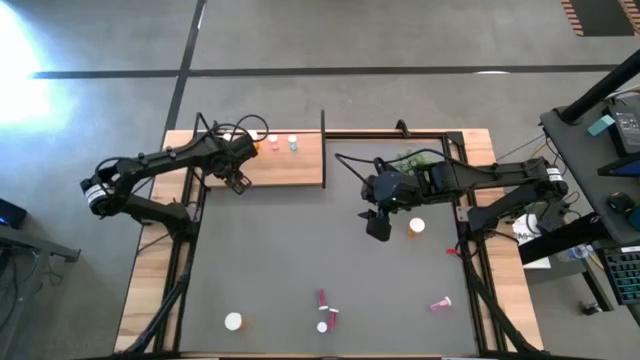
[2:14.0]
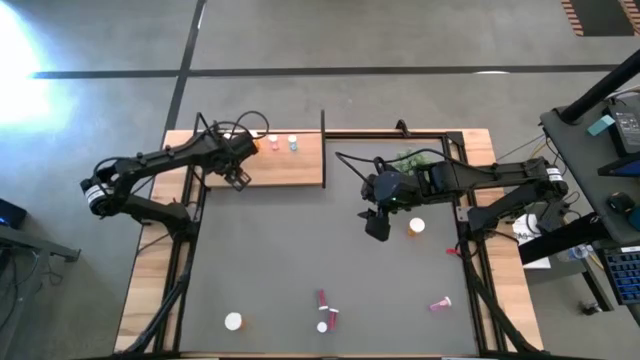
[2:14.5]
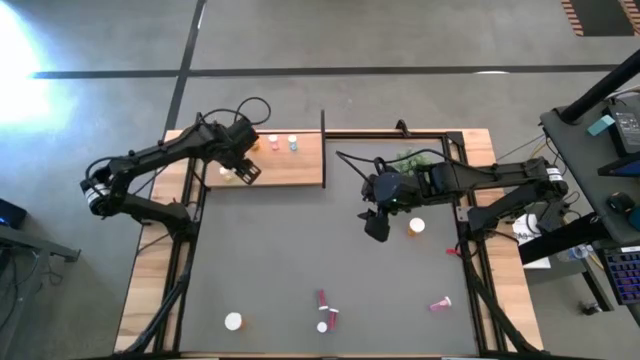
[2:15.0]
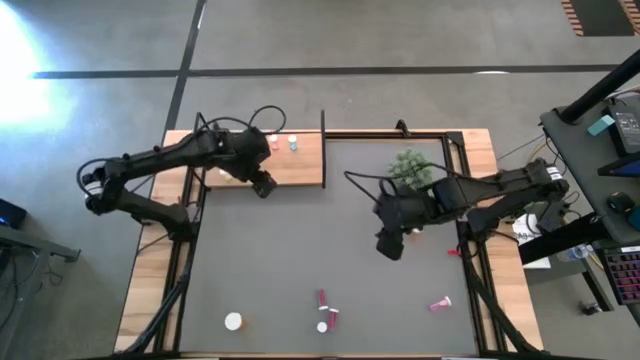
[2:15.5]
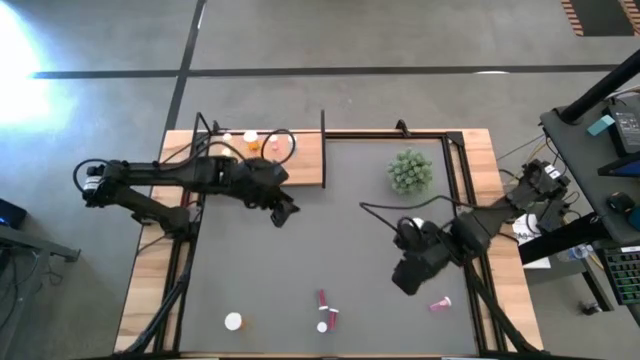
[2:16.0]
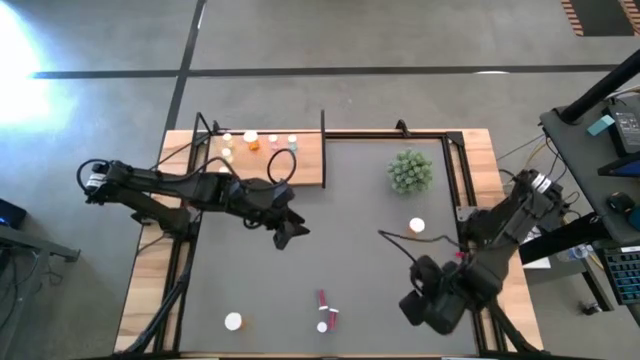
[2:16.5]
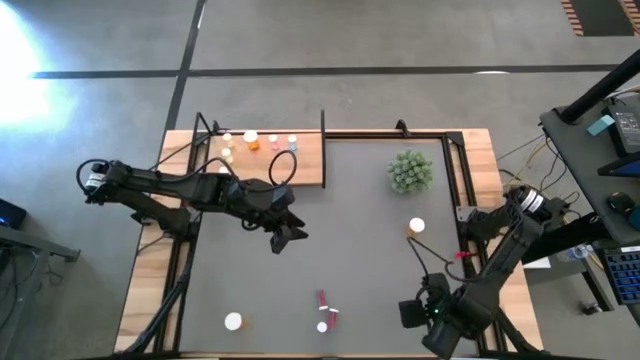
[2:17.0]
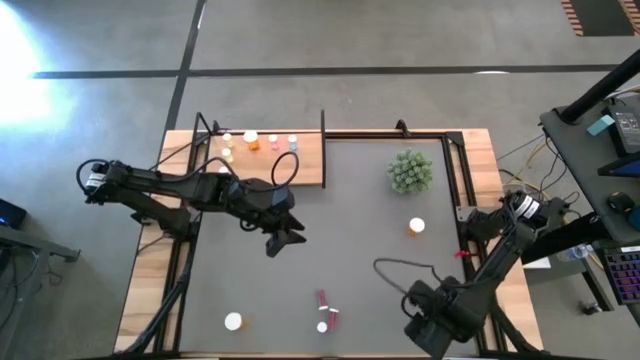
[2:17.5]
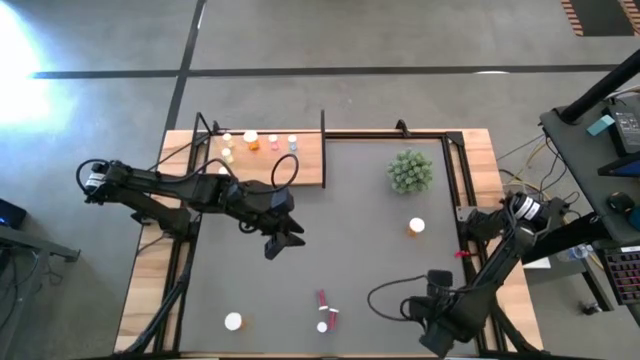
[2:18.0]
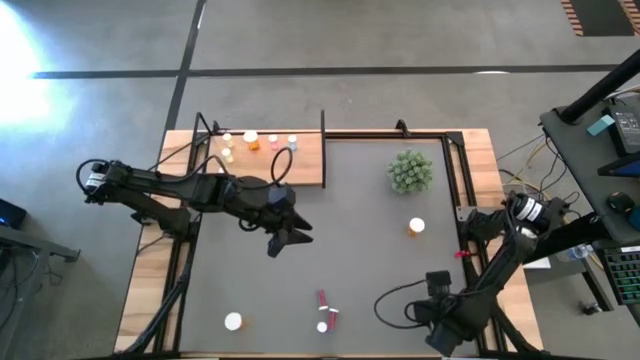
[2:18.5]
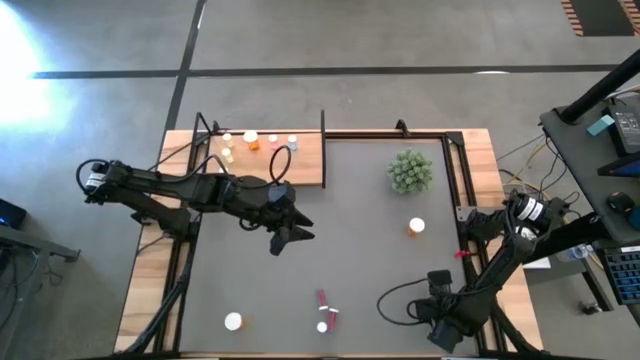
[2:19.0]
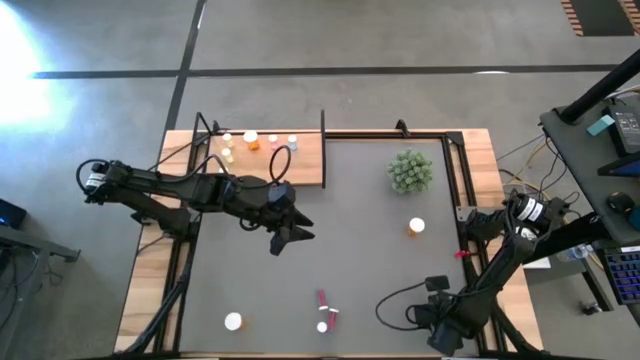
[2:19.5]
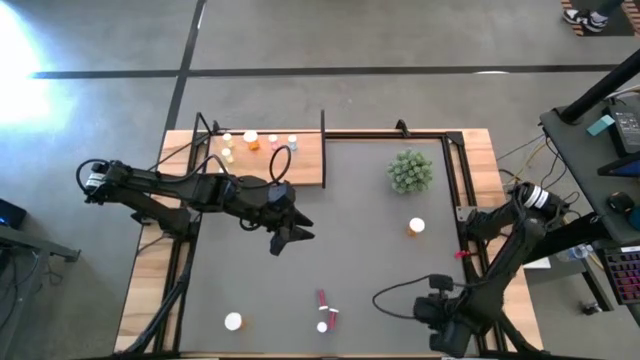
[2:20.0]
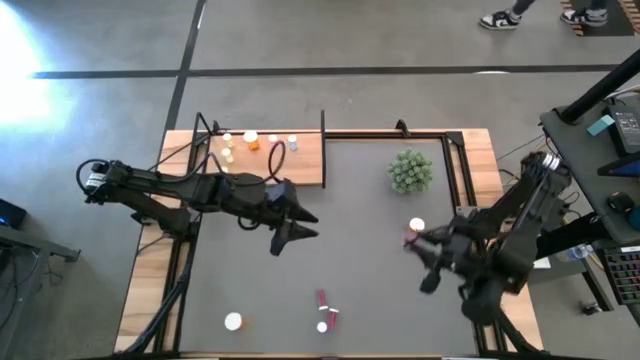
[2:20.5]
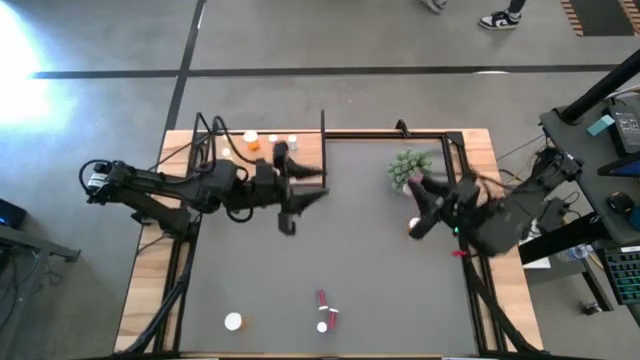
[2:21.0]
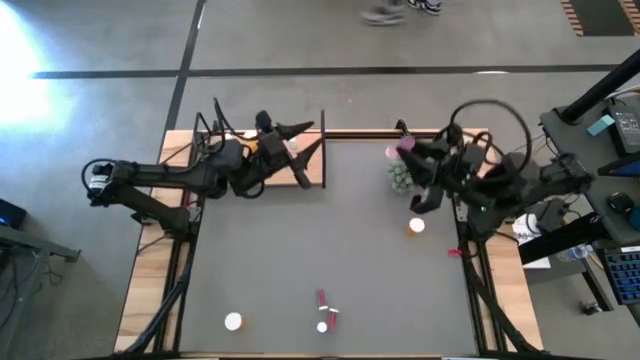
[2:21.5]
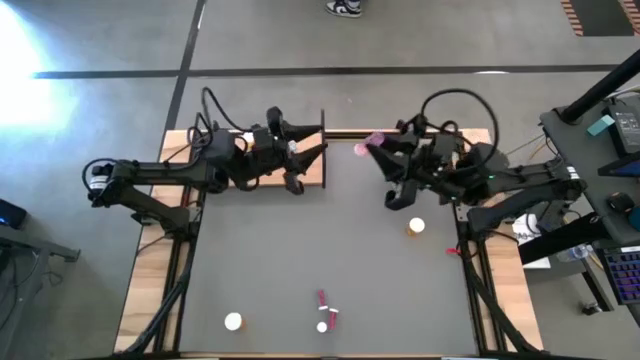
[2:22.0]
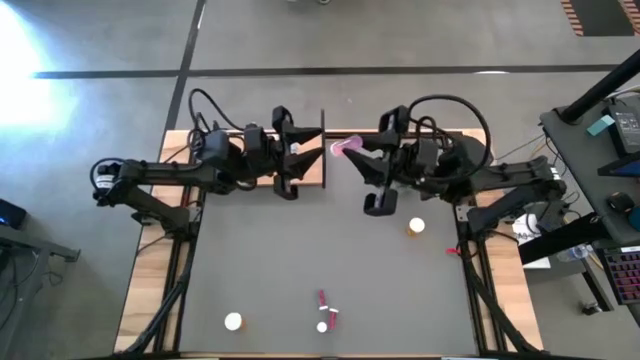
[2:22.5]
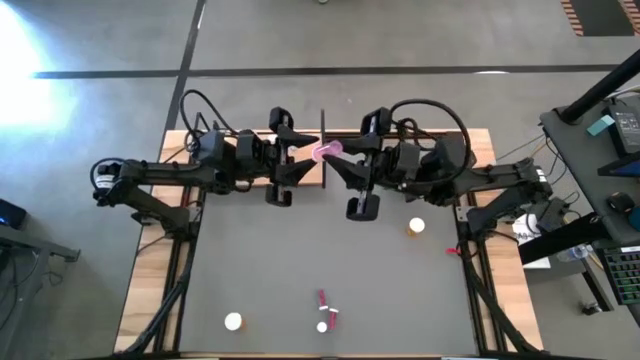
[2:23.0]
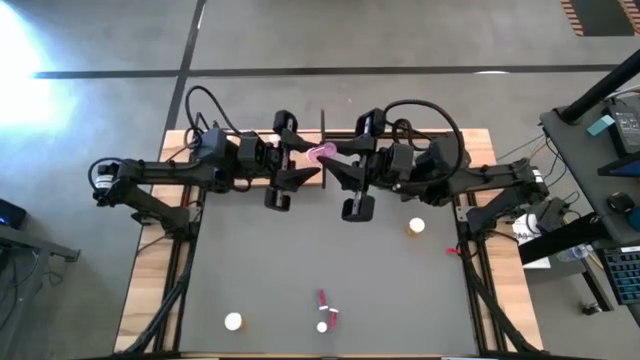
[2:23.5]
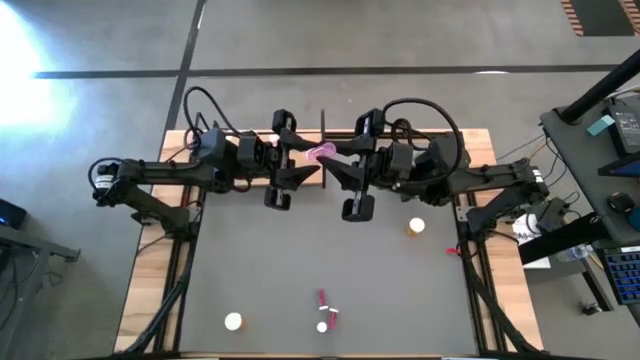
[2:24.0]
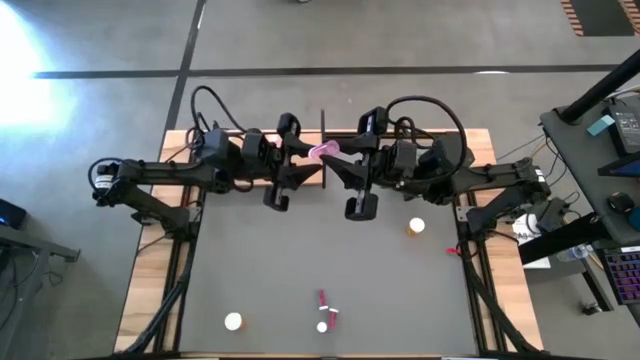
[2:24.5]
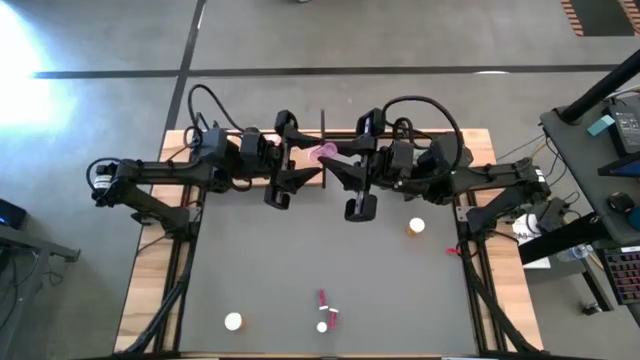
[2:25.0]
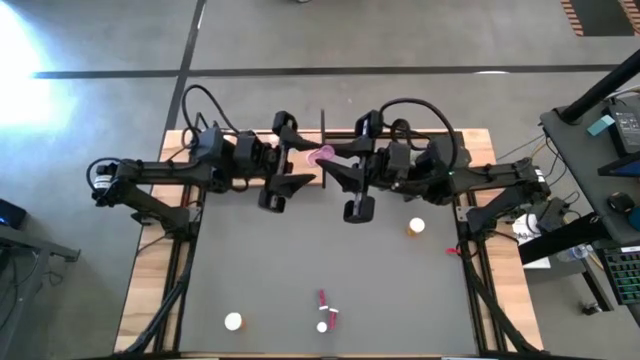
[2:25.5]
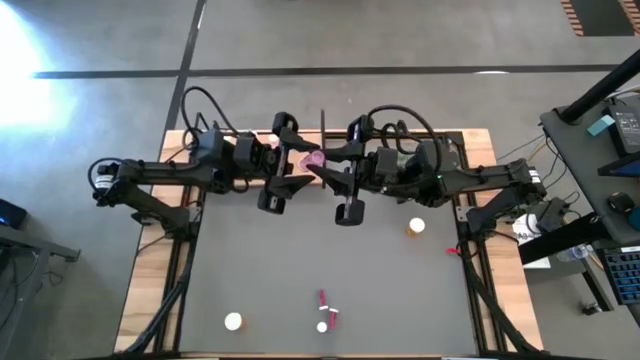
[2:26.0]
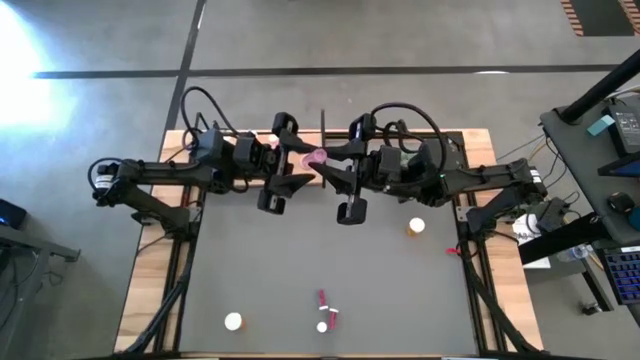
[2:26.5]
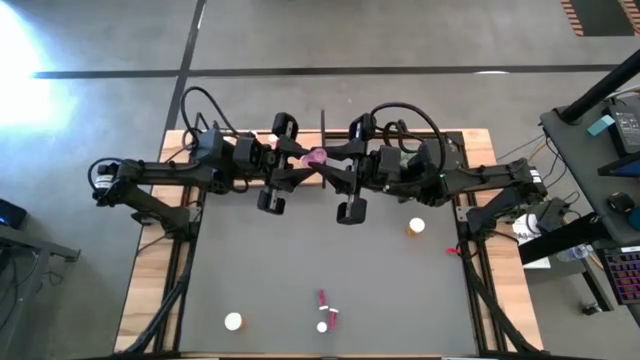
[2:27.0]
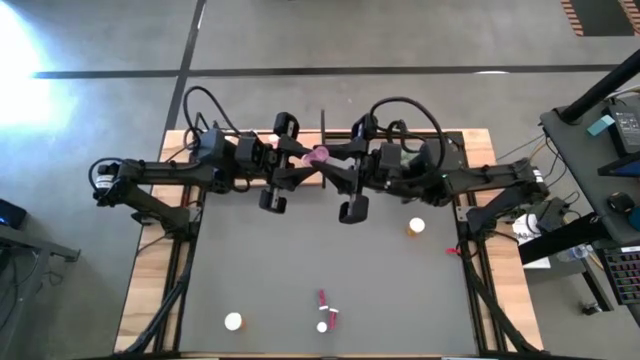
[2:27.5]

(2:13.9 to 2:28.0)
Task: Pick and place medicine bottles onto shelf by color
Put the right pink pill bottle on the shelf aligned with the other pink bottle

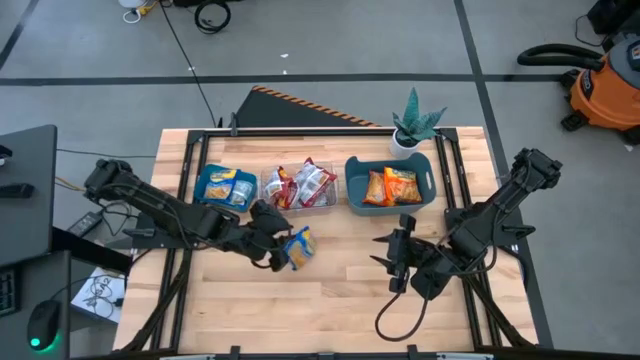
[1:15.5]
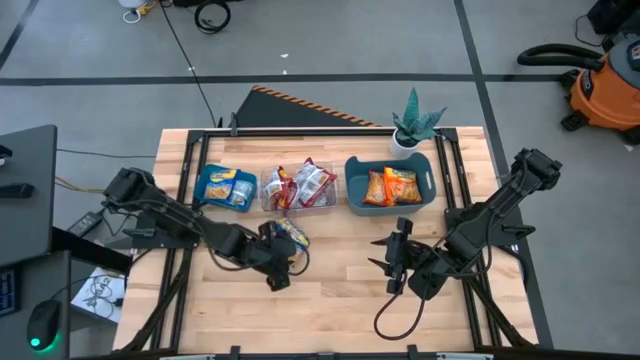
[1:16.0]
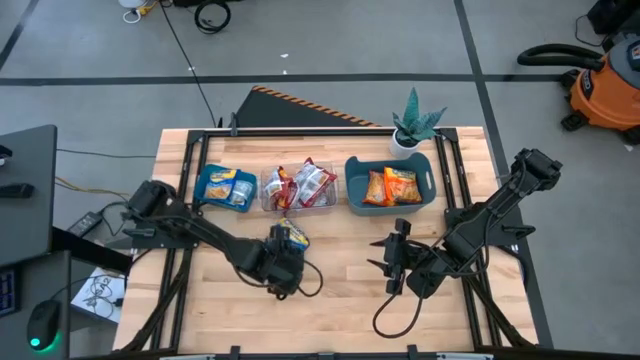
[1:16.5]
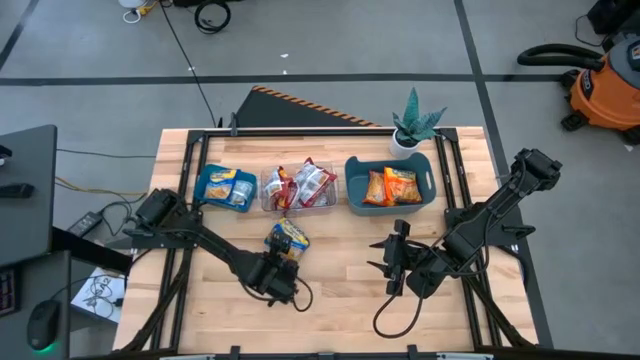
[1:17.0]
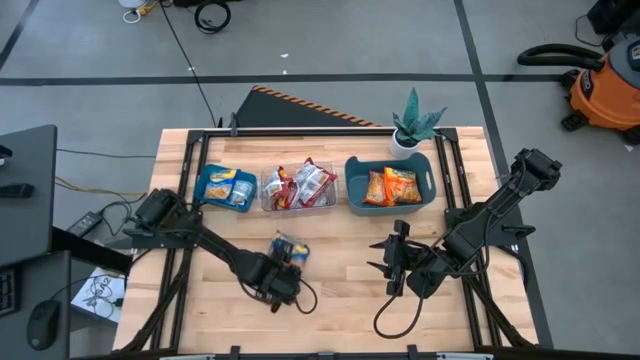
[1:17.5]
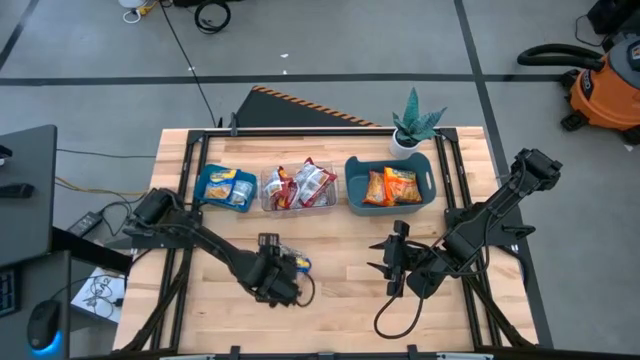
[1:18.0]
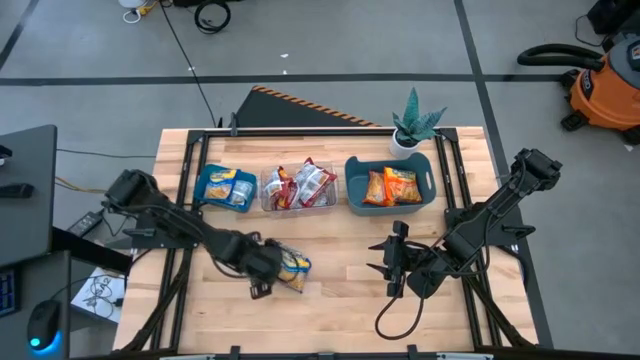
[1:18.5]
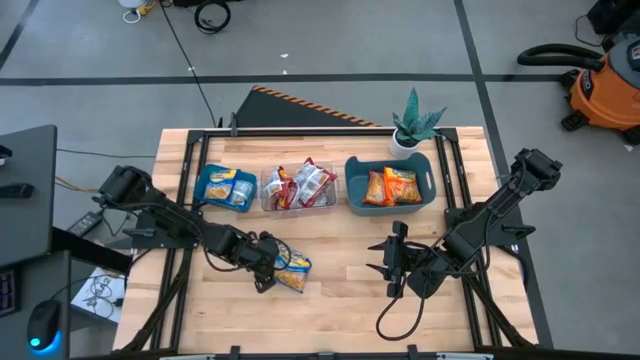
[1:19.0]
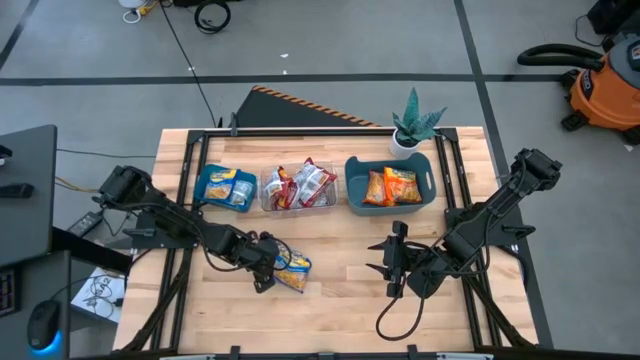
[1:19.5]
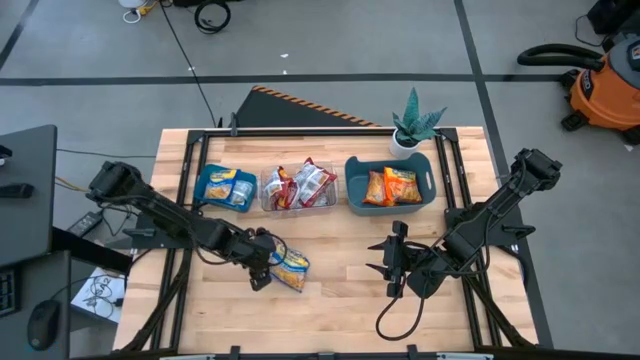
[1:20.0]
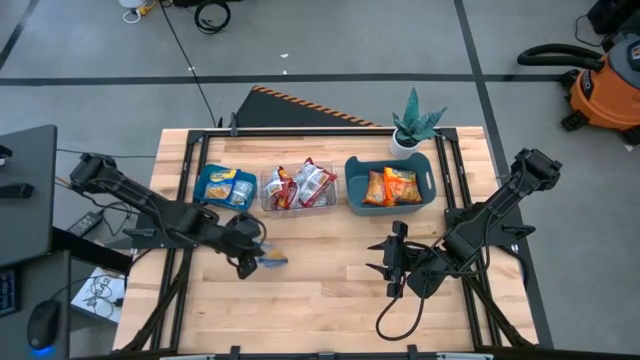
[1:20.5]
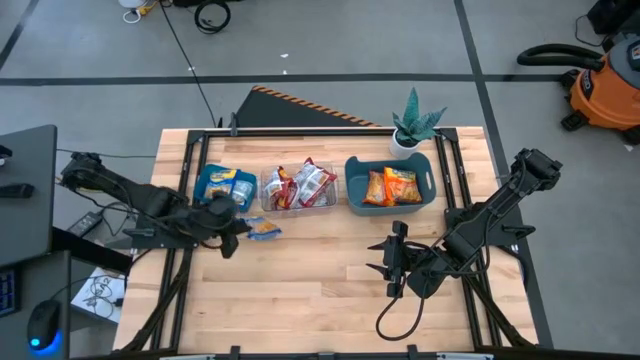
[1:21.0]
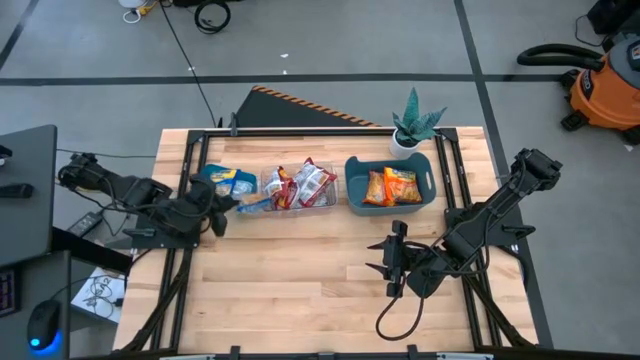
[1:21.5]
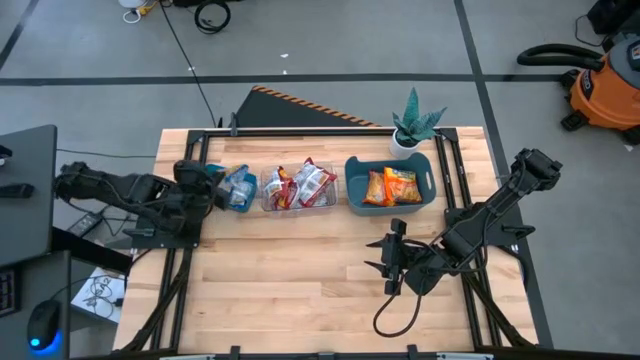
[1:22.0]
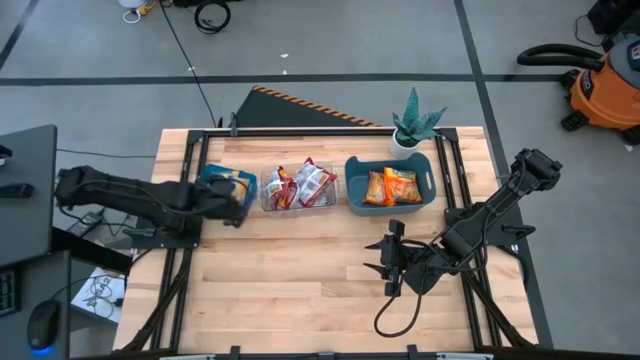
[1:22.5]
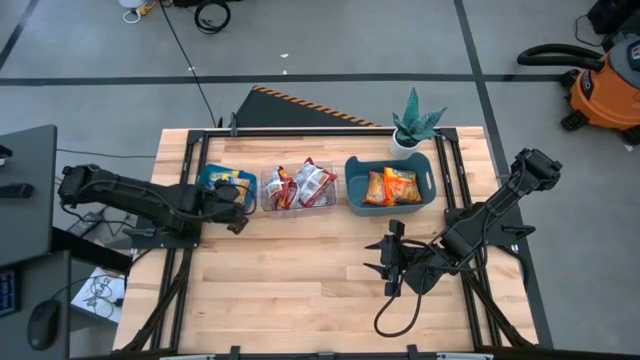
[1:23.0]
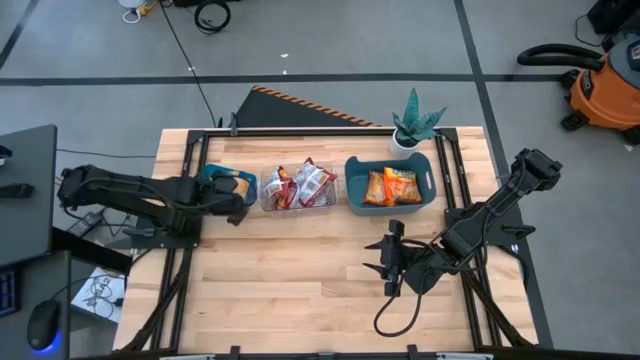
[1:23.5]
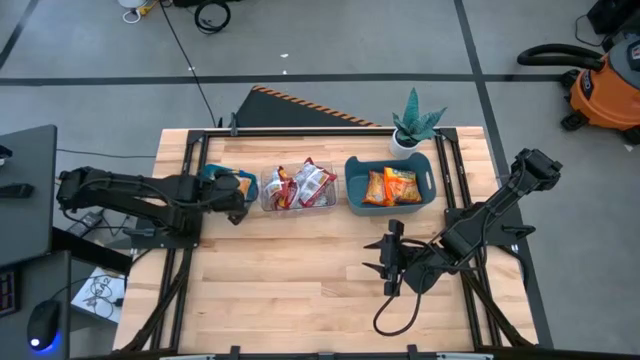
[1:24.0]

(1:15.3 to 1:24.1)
Task: Sort Maruchan noodles
Put the blue noodle pack into the blue bin
